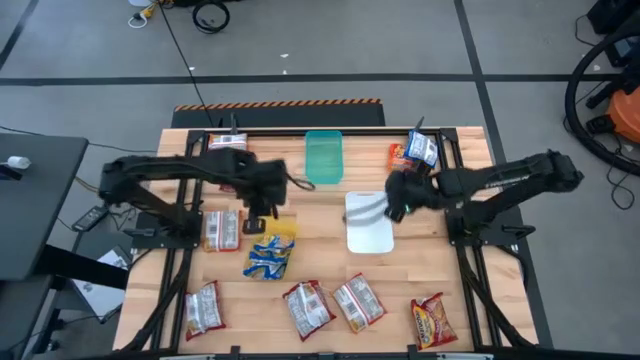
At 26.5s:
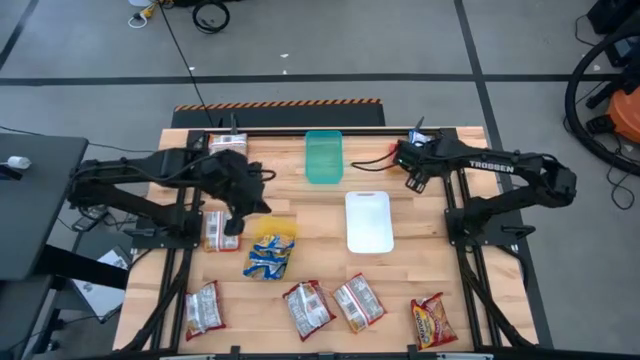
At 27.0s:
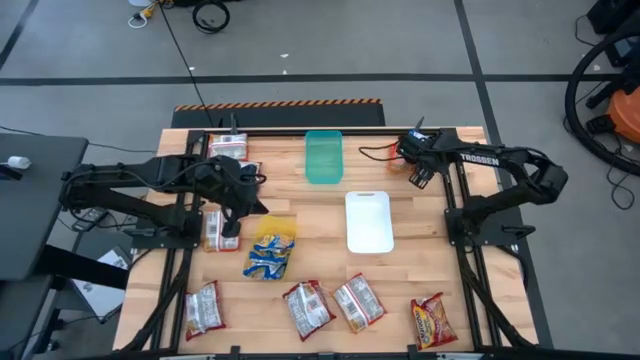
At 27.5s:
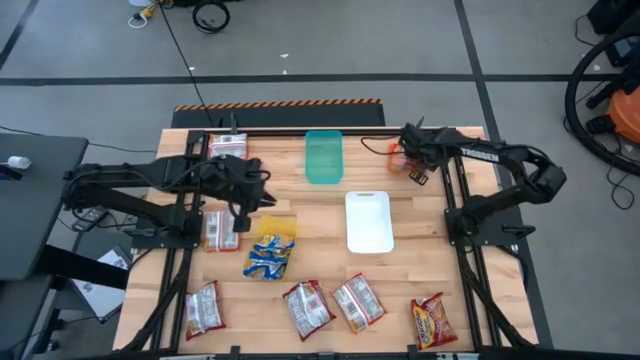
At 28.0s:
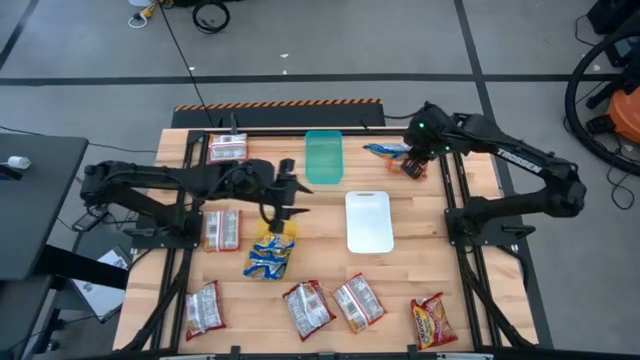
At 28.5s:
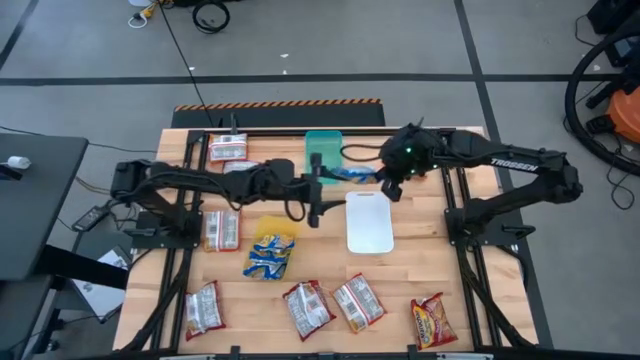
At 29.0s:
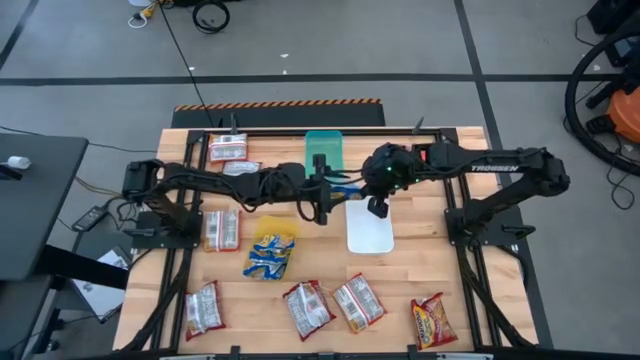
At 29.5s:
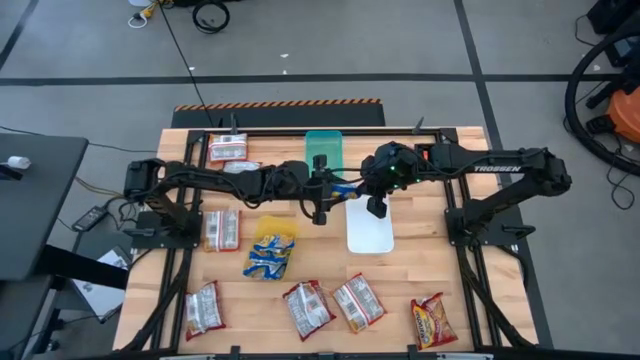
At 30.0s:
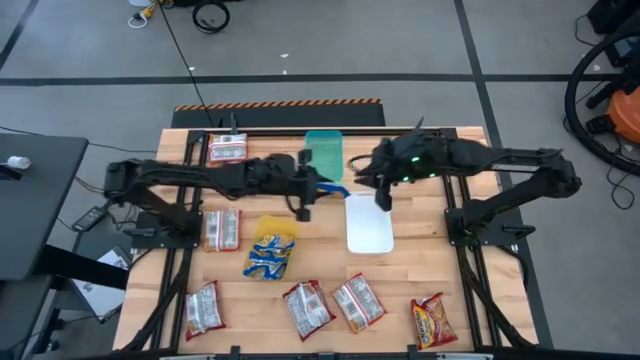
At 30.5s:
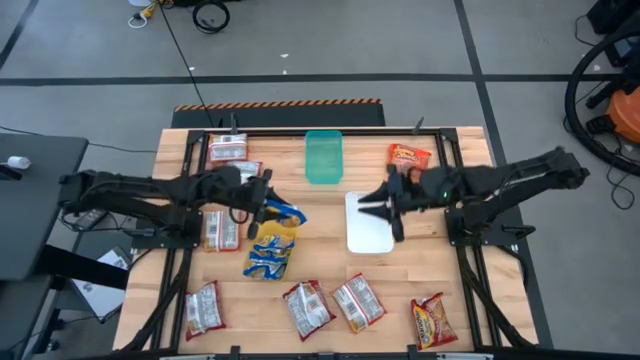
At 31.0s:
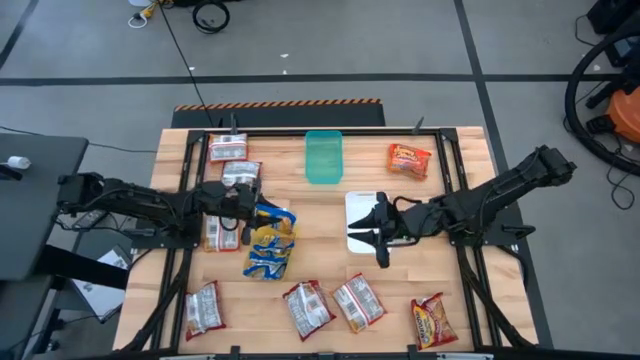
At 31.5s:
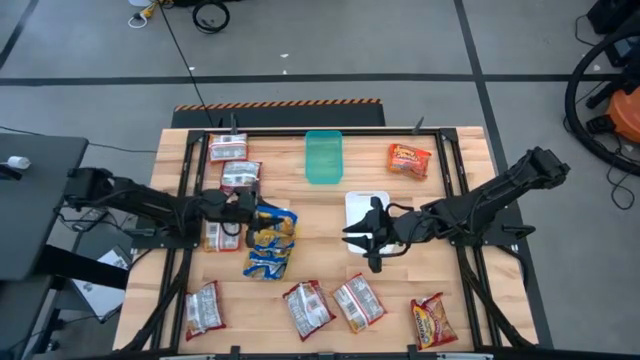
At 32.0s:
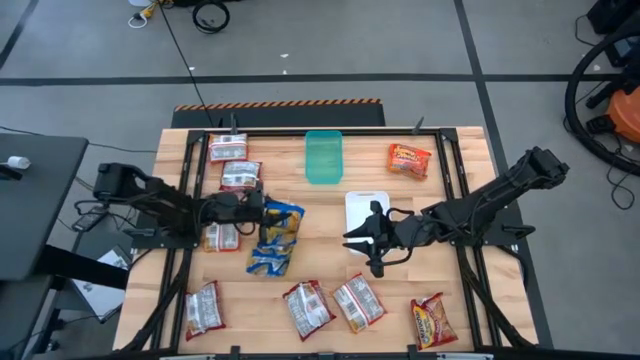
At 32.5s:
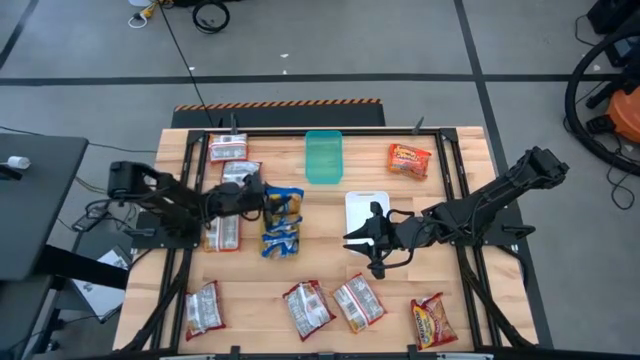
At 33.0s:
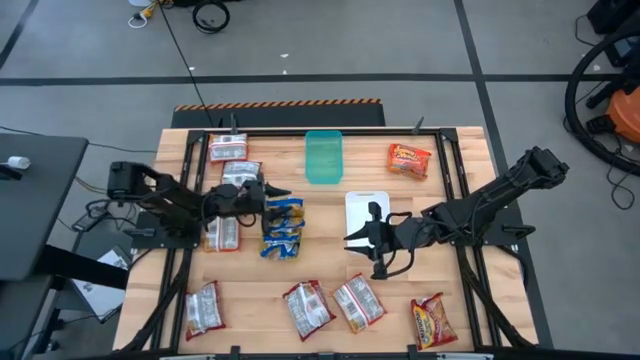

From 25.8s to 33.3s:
Task: Sort Maruchan noodles
Put the blue noodle pack into the yellow bin

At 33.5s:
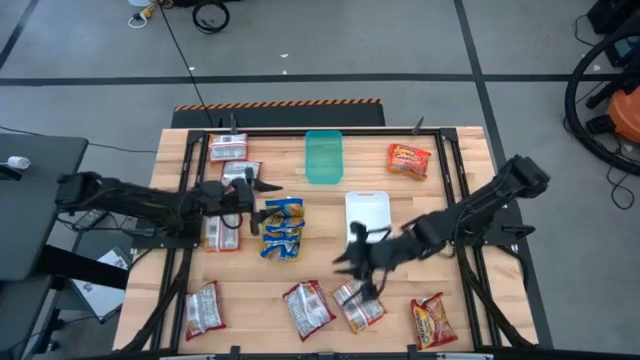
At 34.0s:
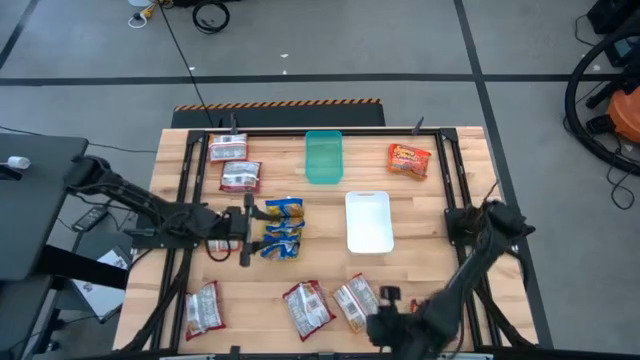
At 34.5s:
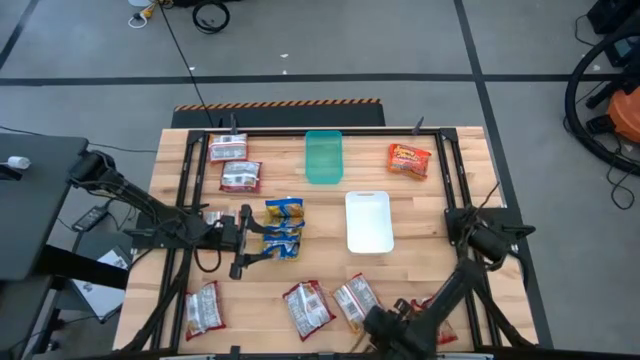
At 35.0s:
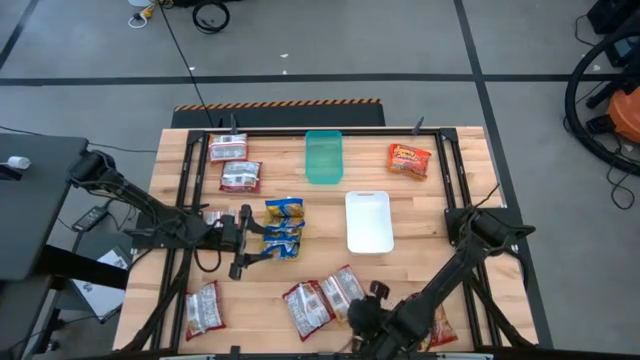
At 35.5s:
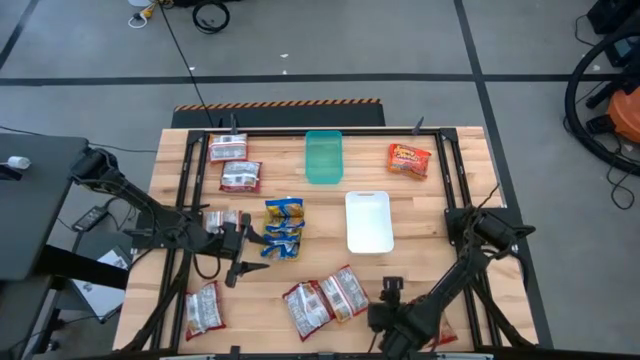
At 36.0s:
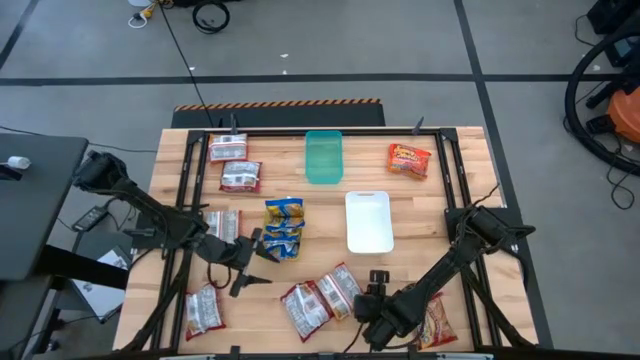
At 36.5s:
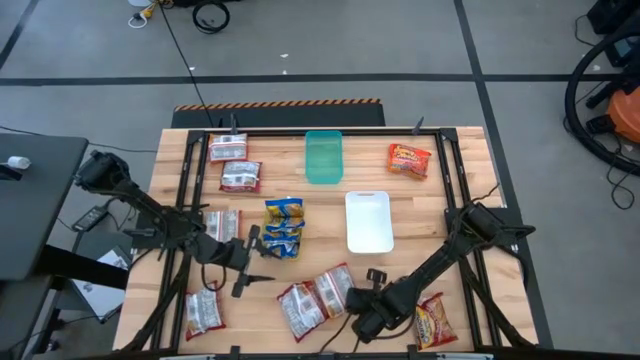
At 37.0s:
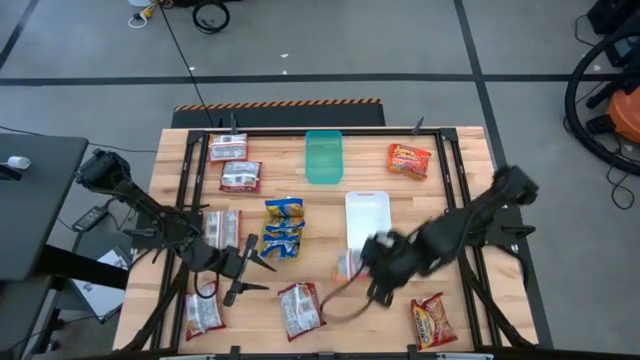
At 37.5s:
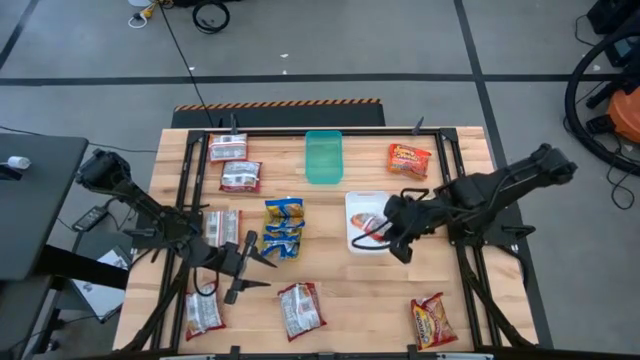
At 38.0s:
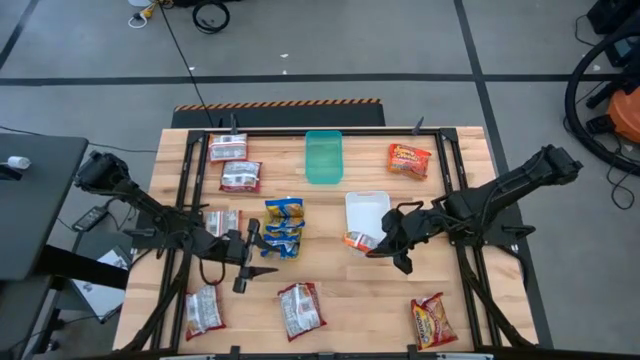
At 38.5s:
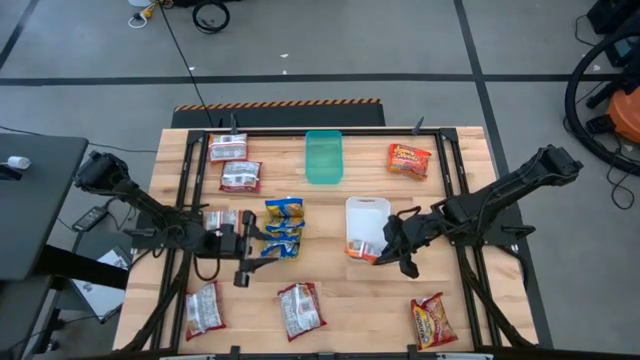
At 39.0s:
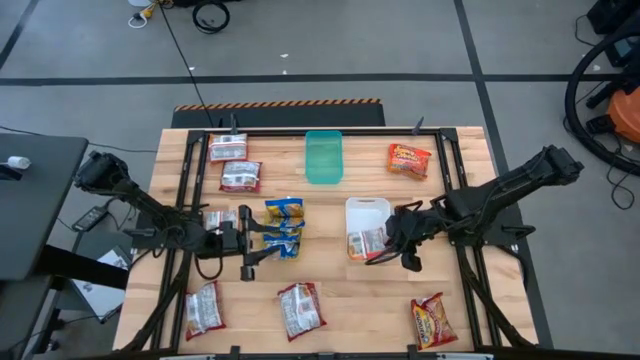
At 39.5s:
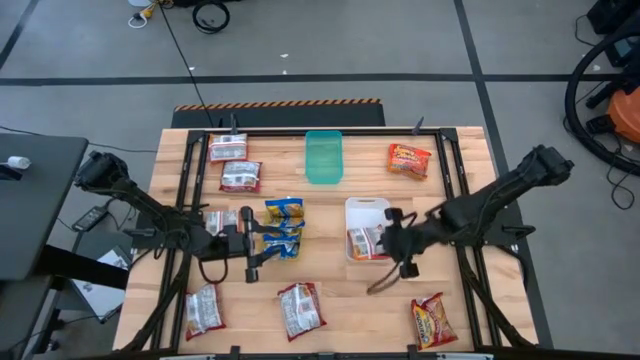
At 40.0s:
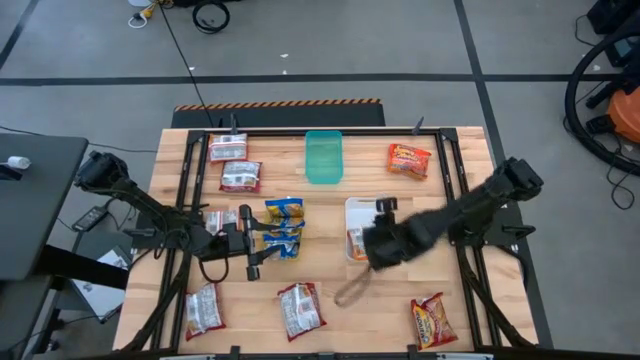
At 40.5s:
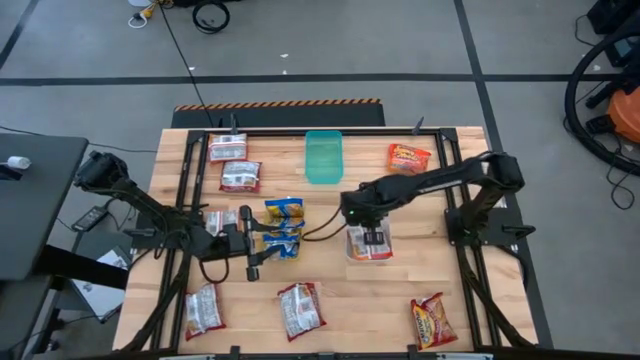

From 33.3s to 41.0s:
Put the bottom right orange noodle pack into the white bin

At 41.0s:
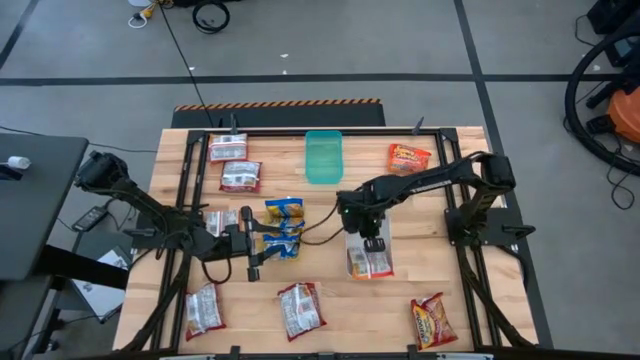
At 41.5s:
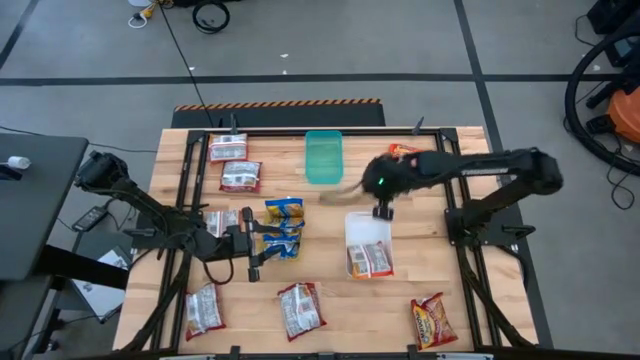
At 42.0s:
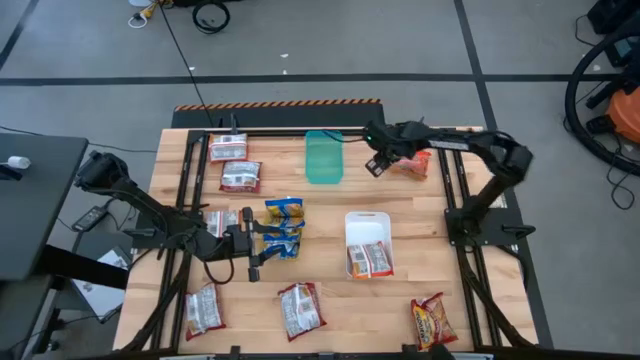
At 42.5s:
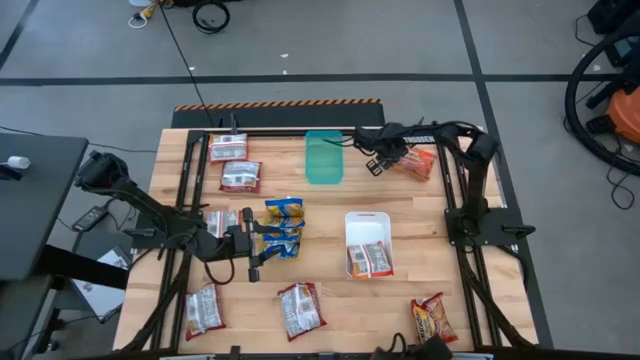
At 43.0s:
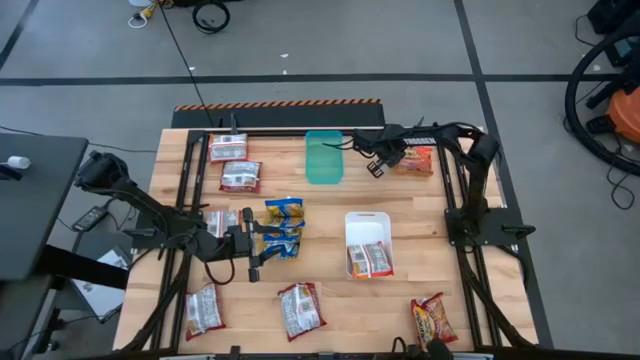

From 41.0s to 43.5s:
Put the top right orange noodle pack into the white bin

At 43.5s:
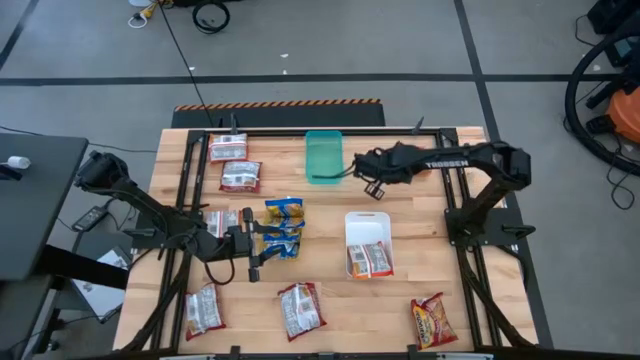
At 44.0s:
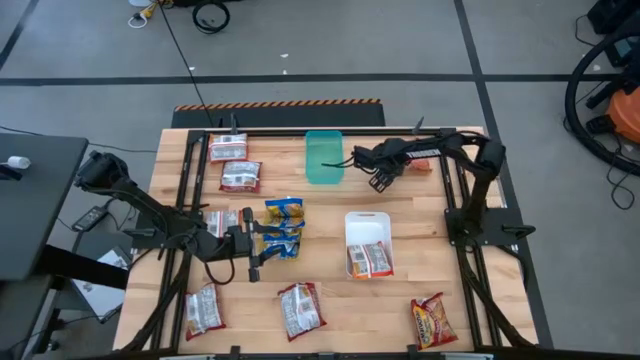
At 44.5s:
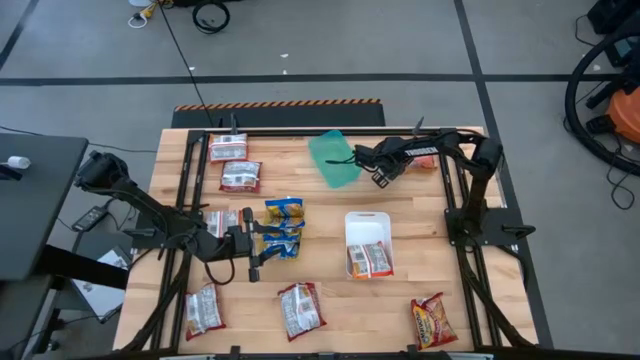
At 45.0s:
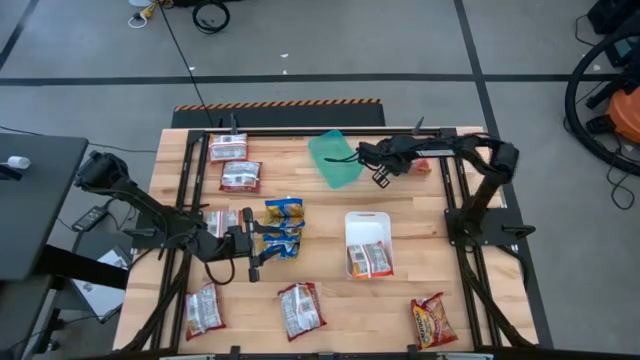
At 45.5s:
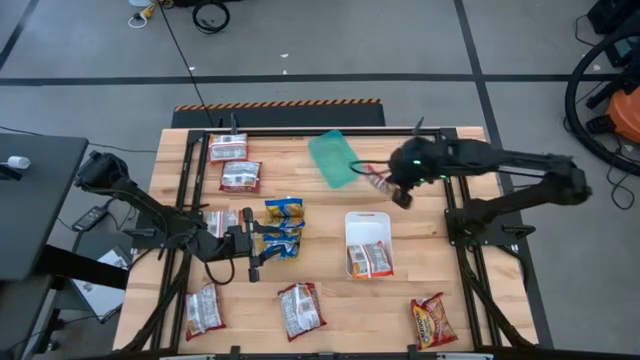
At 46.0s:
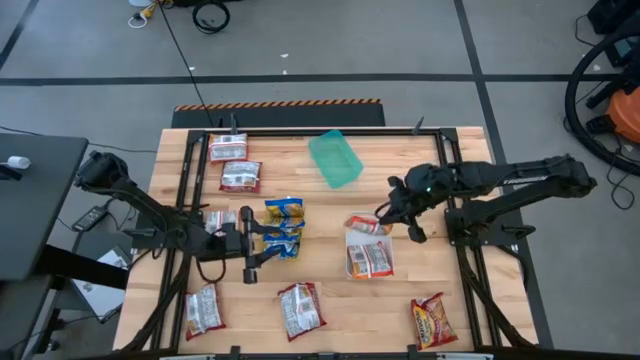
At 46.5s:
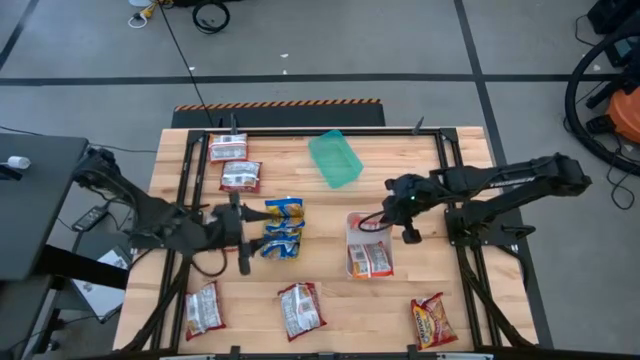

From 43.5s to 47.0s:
Put the top right orange noodle pack into the white bin
